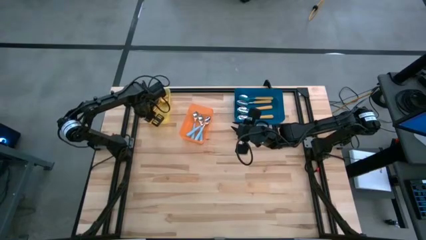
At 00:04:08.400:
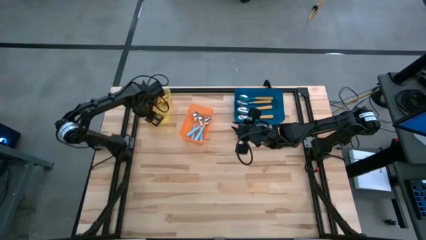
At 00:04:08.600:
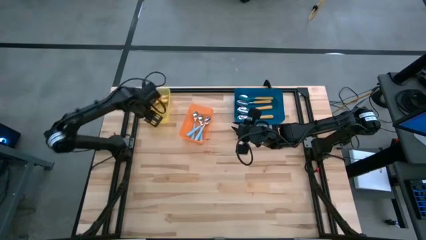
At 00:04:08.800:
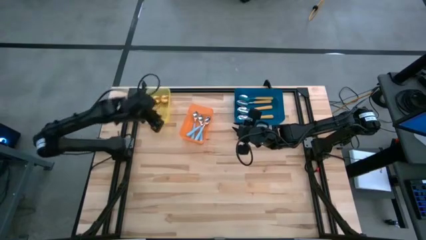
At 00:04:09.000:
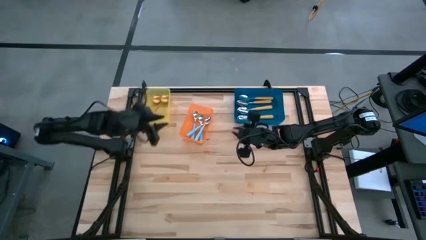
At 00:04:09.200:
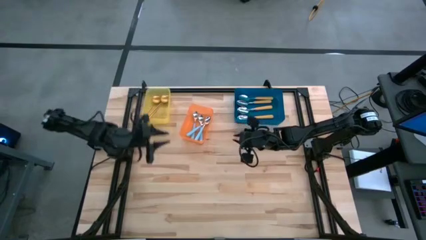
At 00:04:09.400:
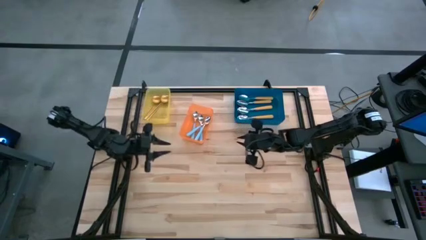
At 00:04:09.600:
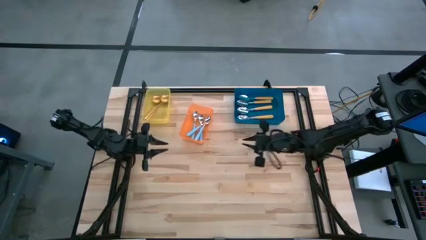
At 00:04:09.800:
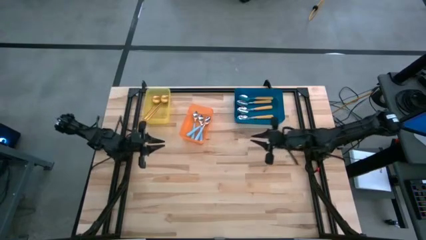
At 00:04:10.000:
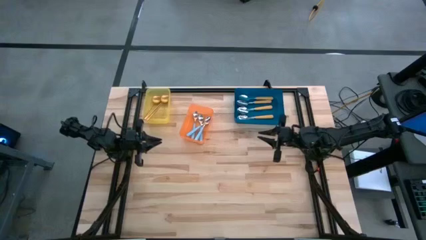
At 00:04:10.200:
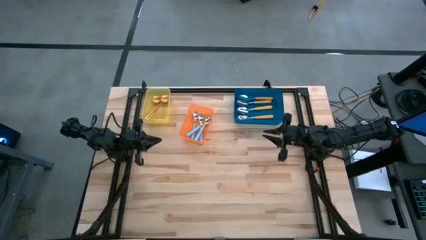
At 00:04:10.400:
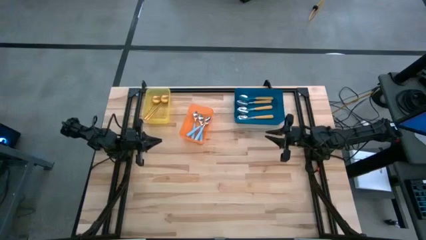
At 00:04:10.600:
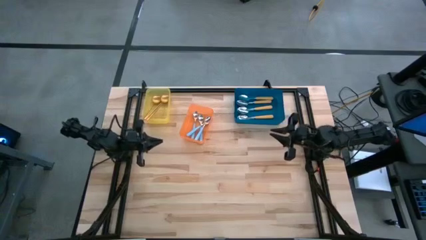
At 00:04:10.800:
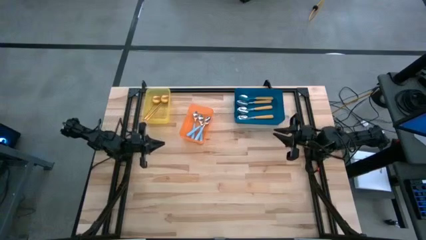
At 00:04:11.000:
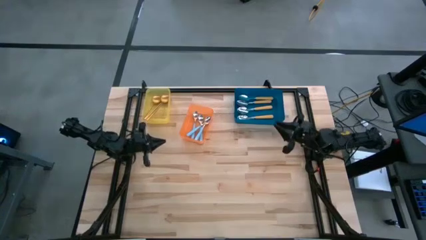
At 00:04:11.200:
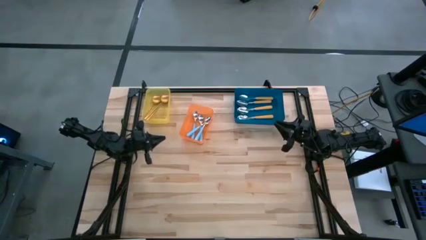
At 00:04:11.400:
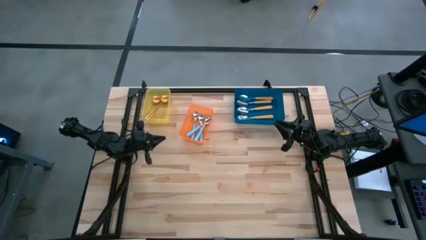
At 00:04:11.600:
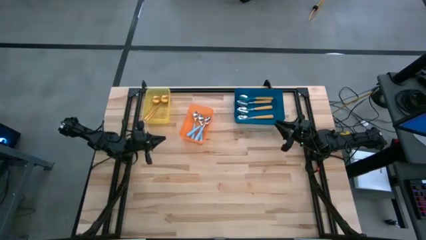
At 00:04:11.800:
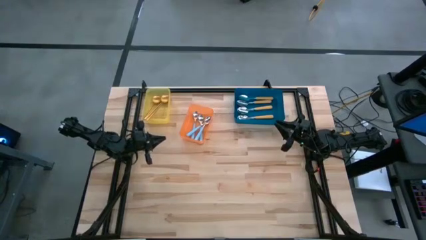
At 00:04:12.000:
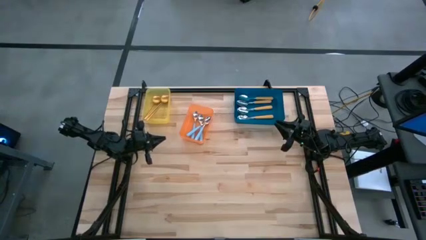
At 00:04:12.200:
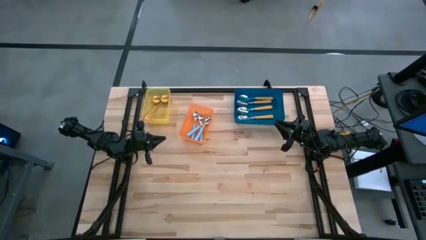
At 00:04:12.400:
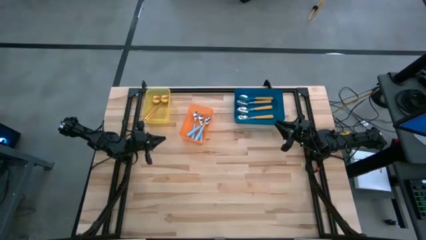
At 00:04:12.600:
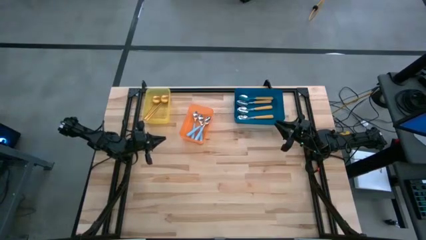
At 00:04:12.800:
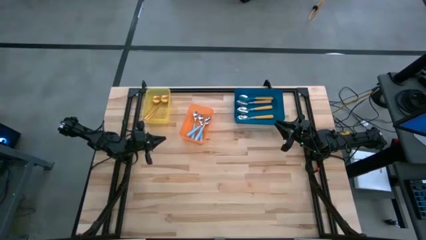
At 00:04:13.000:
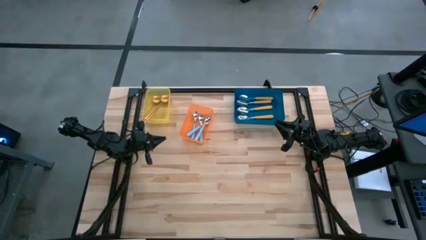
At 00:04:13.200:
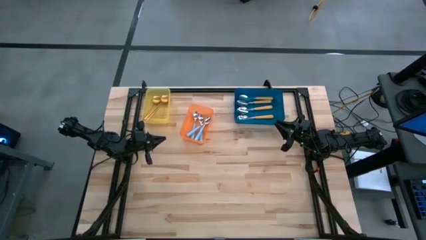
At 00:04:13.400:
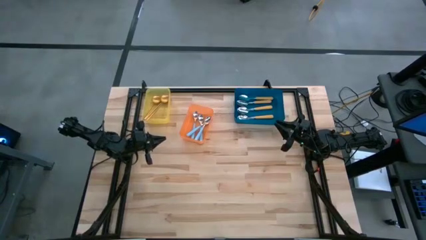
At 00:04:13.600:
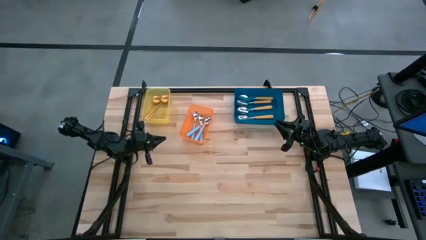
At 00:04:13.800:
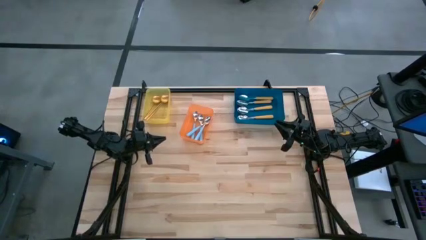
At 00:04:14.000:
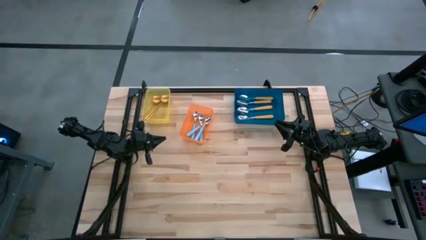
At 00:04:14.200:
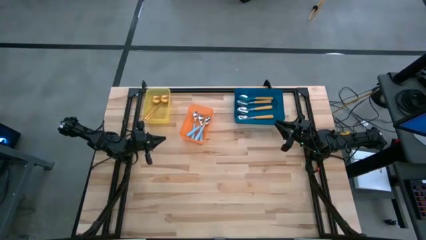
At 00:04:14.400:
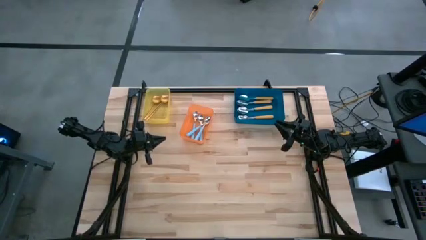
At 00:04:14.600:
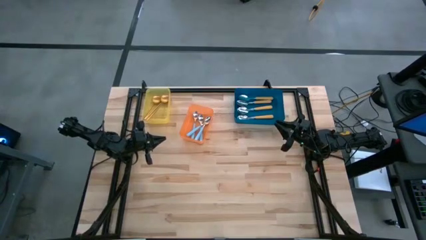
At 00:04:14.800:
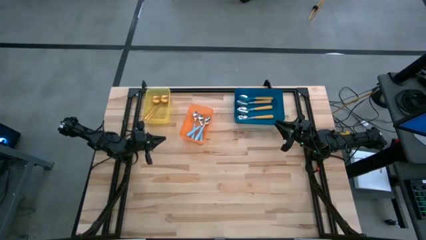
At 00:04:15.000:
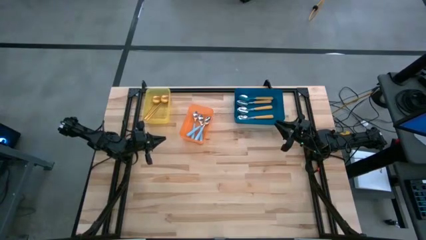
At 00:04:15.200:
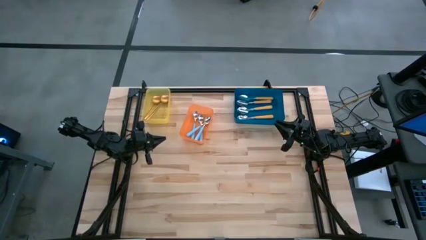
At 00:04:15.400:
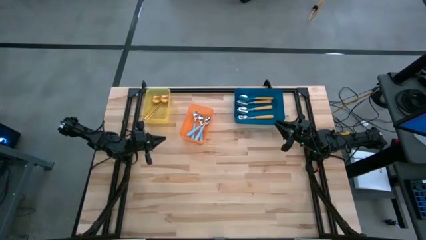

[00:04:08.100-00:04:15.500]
Task: Sort silverware by color (type)
Return to Home Position
